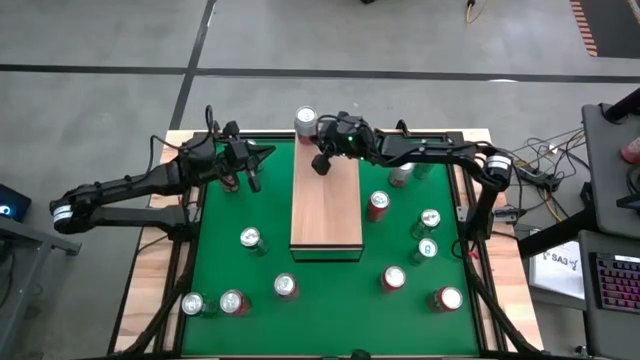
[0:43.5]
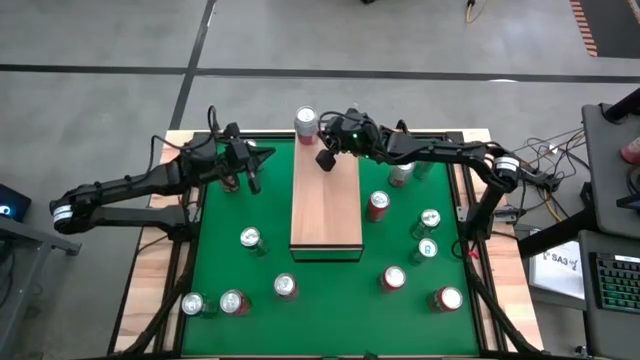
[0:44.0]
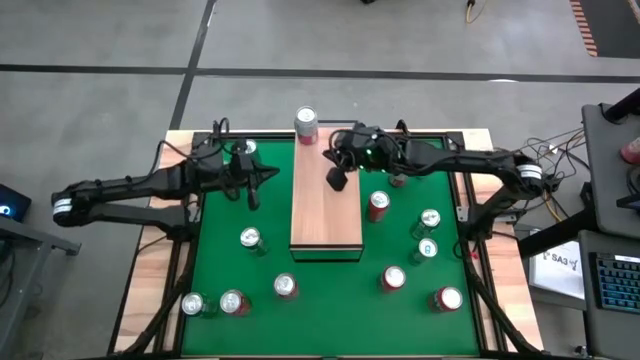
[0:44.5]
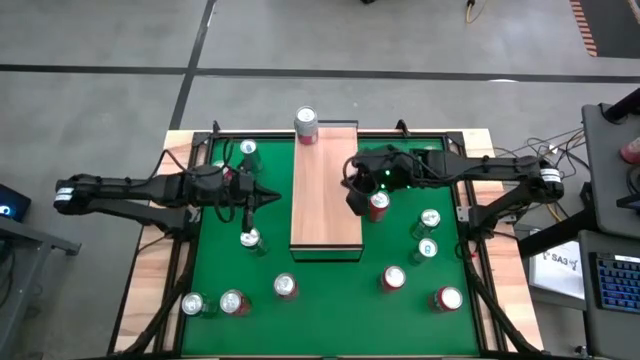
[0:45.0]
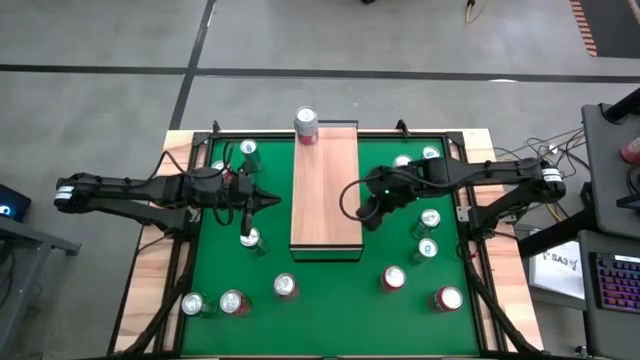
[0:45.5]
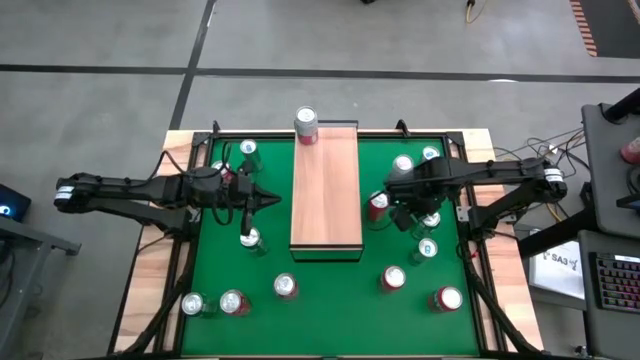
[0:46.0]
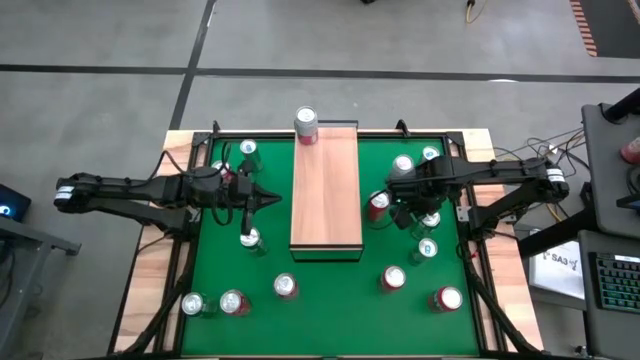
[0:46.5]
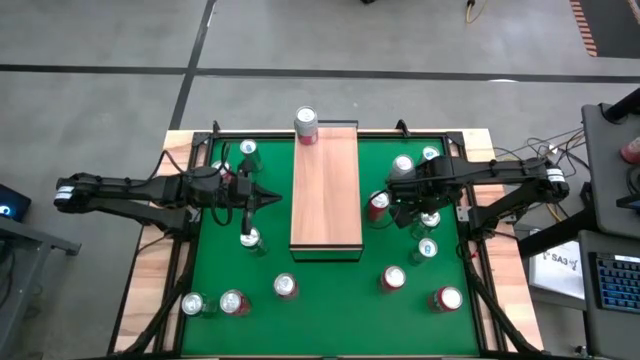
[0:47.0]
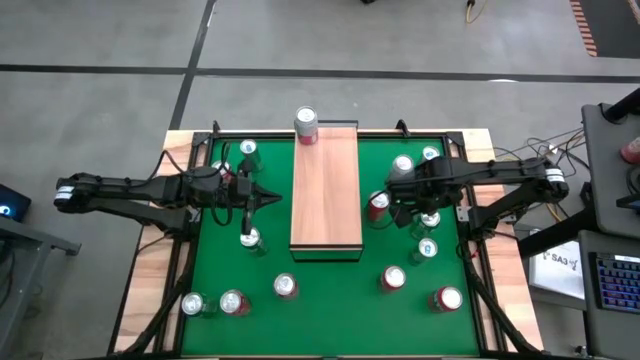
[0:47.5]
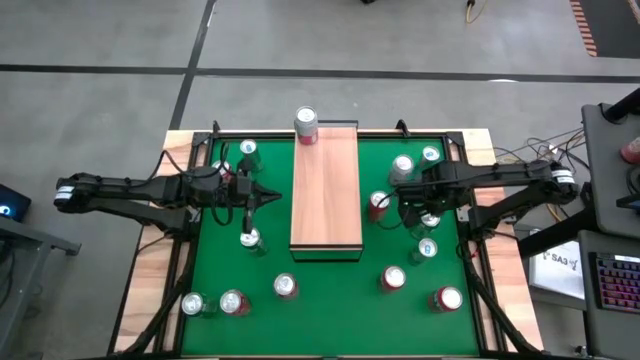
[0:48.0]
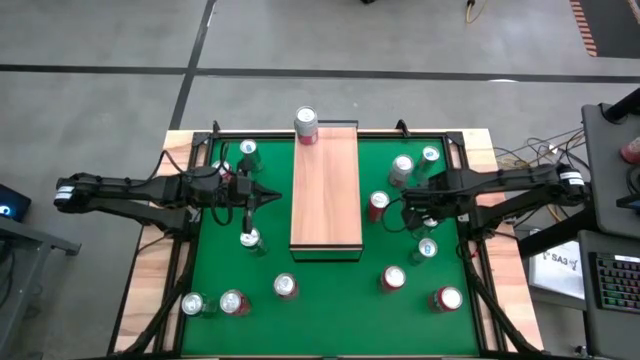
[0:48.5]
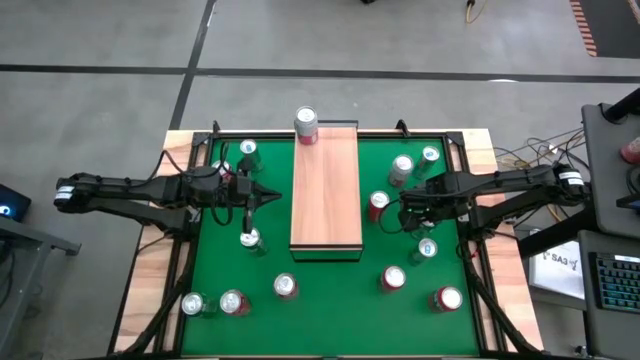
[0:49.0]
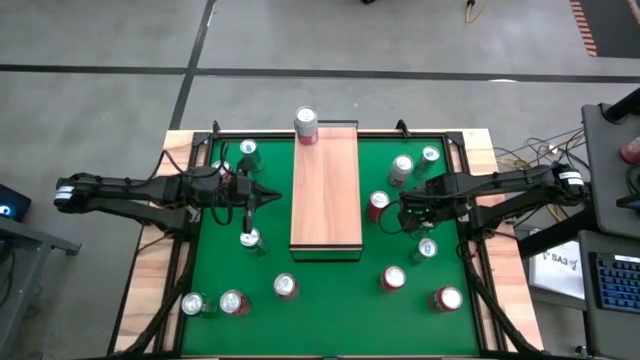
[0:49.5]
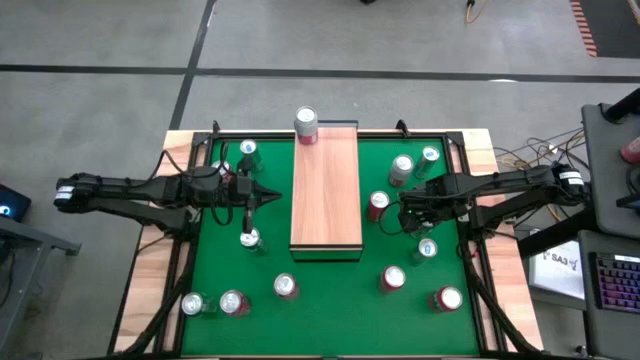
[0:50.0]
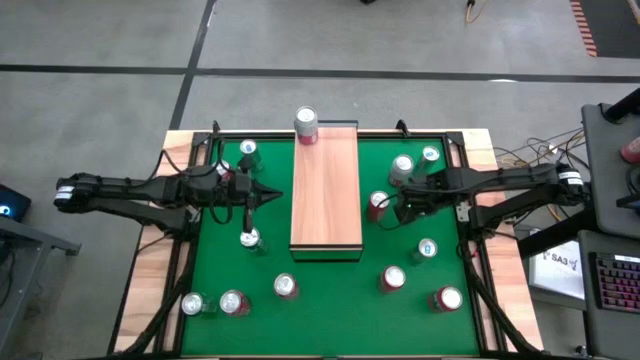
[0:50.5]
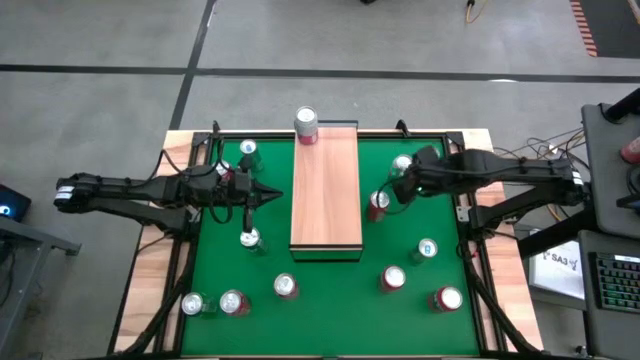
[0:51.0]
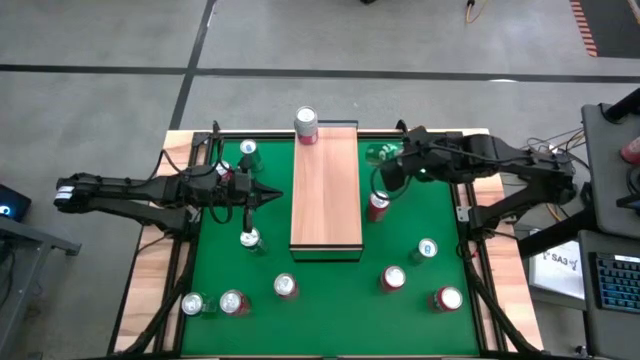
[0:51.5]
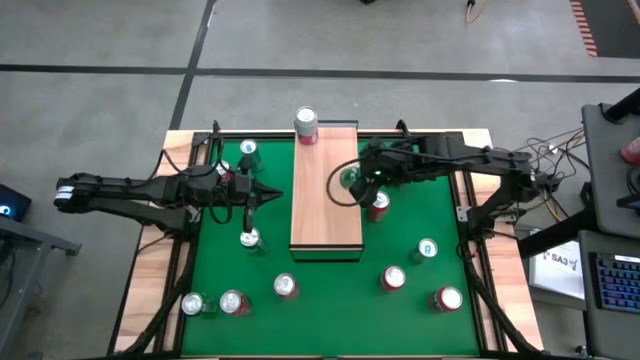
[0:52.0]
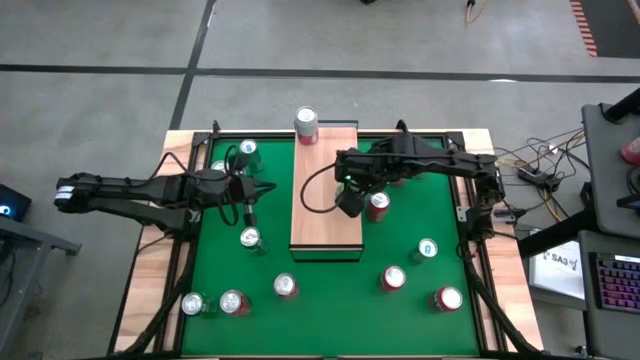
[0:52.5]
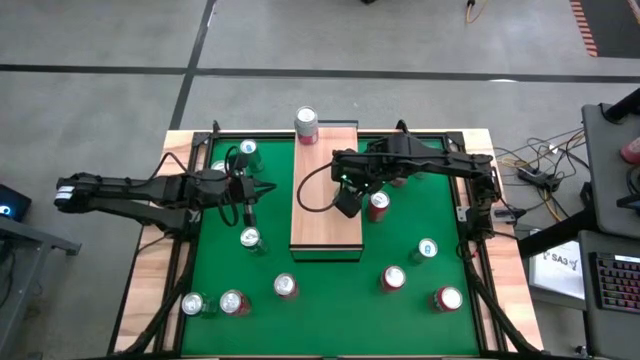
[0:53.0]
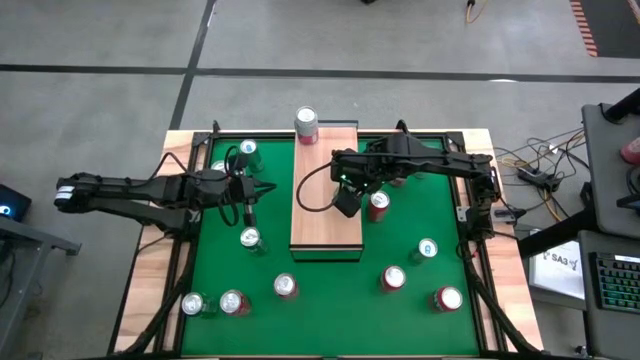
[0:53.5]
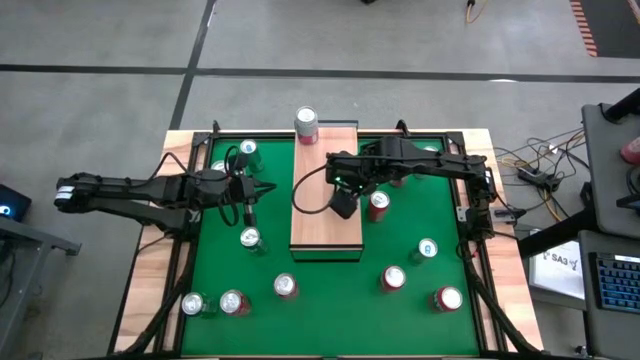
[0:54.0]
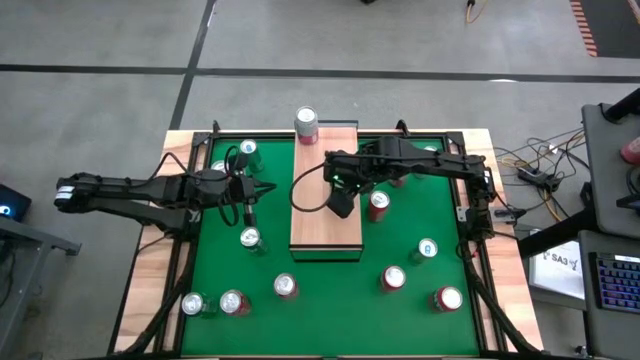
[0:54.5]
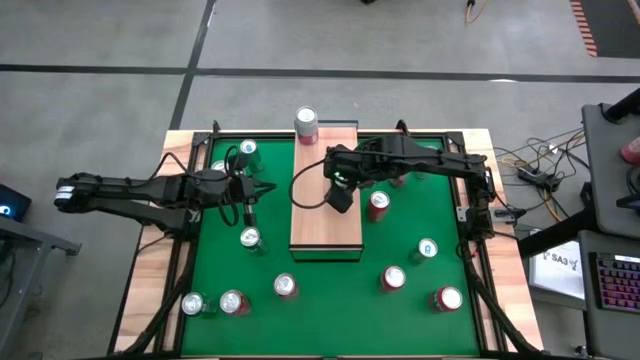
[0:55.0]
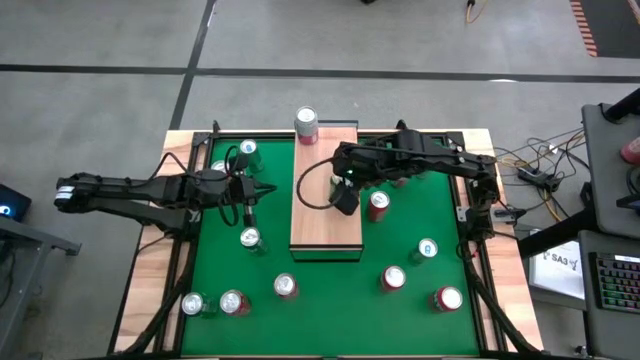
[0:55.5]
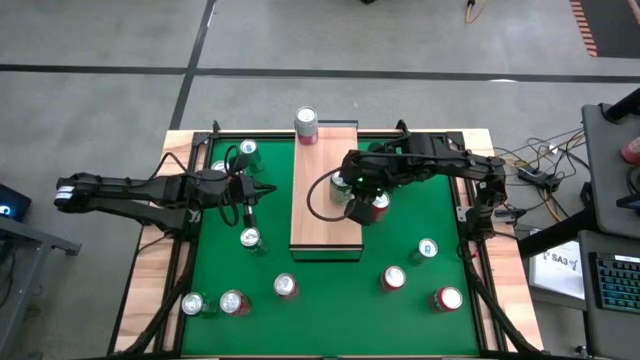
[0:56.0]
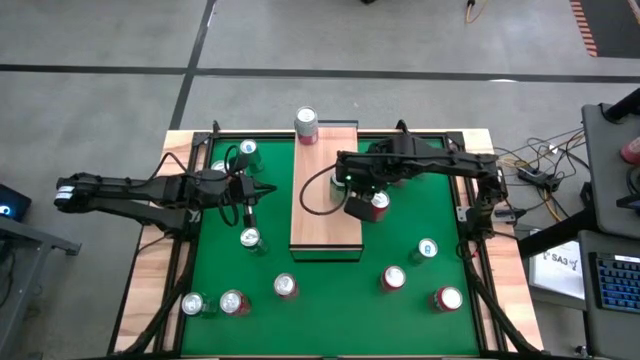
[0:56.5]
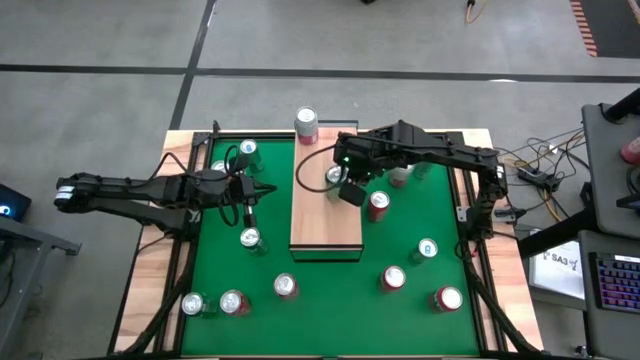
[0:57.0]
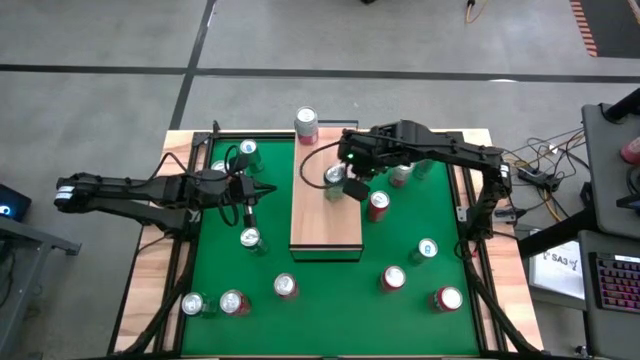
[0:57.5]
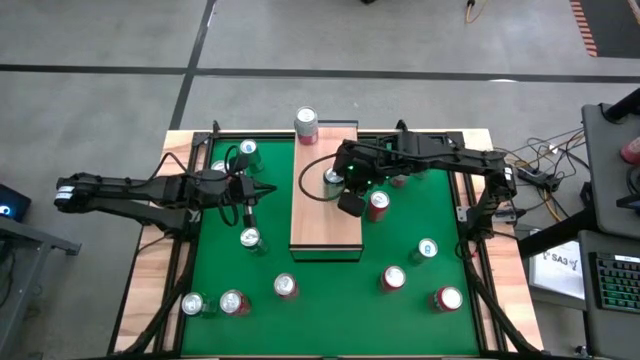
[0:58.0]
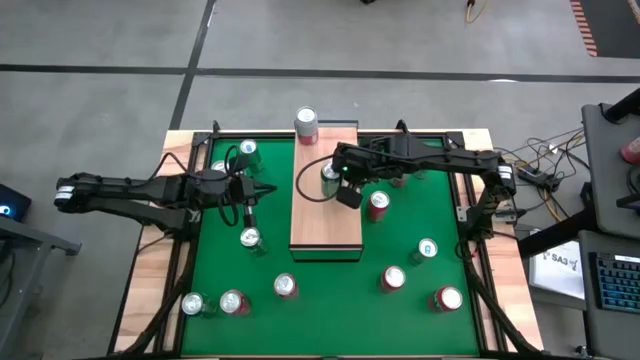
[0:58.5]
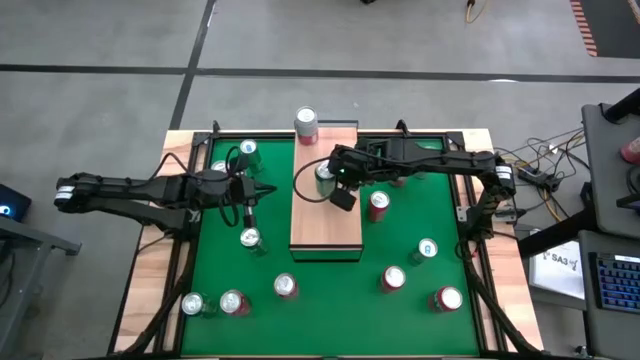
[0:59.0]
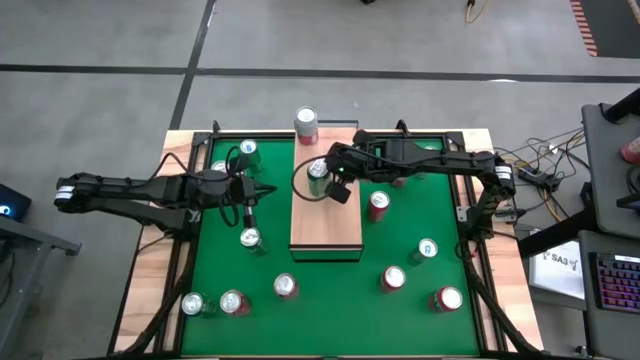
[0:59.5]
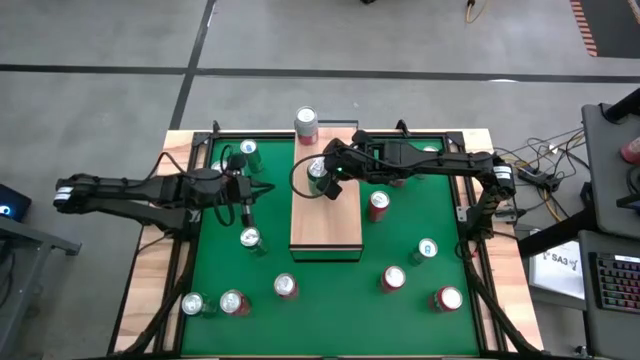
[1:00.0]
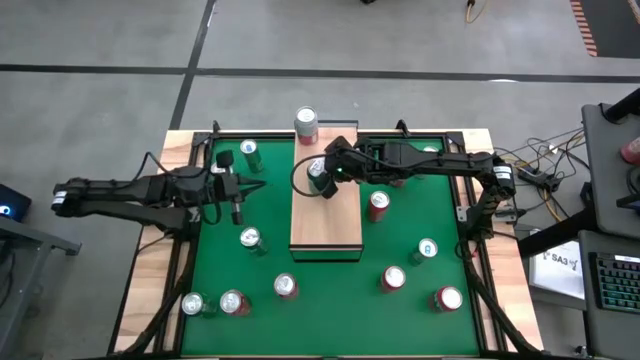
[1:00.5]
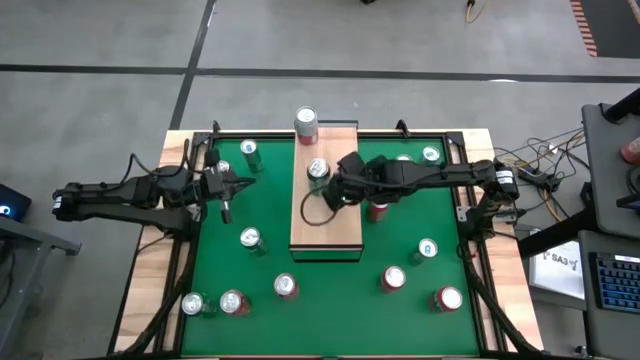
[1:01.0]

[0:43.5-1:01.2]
Task: Place canned beverage on shelf
Put the green can on the shelf

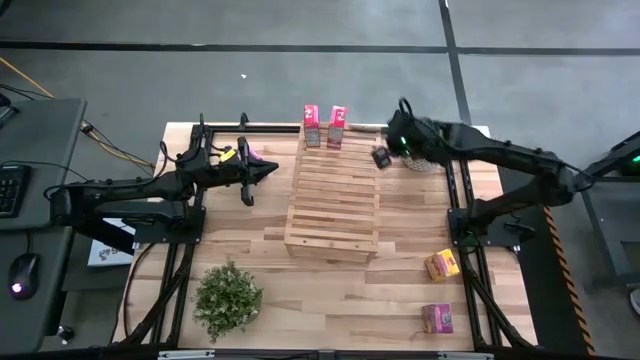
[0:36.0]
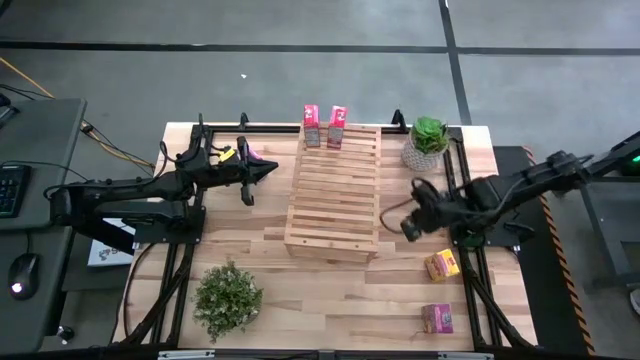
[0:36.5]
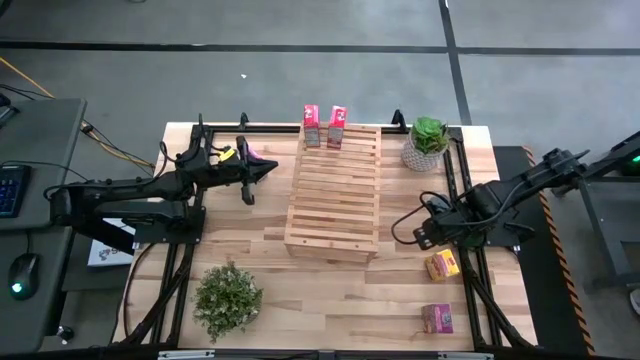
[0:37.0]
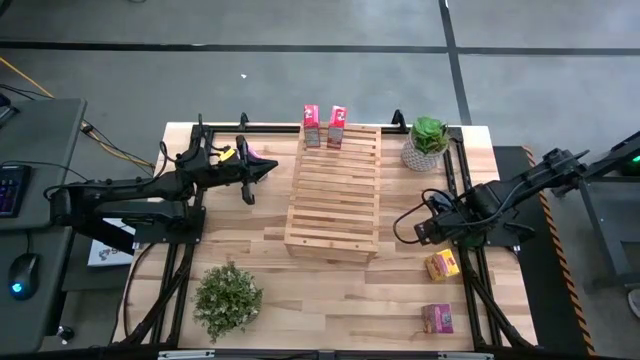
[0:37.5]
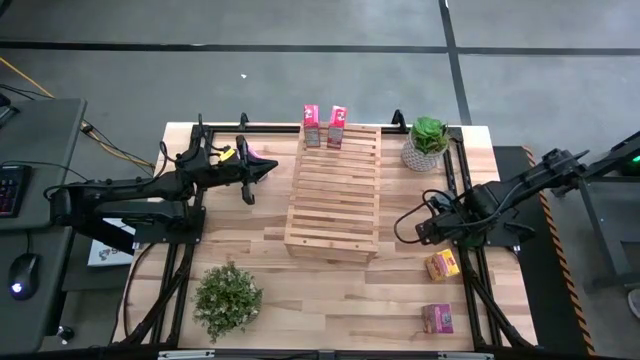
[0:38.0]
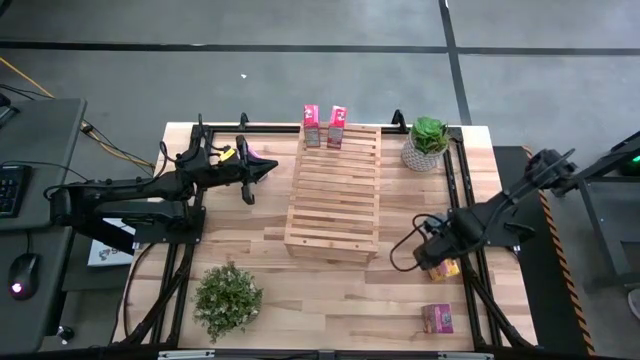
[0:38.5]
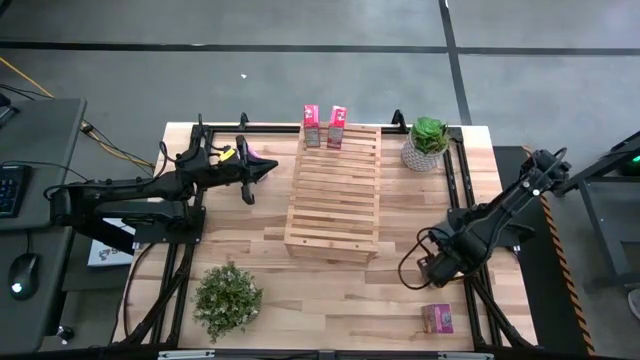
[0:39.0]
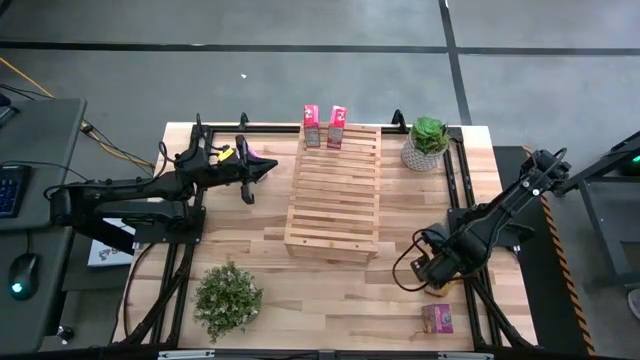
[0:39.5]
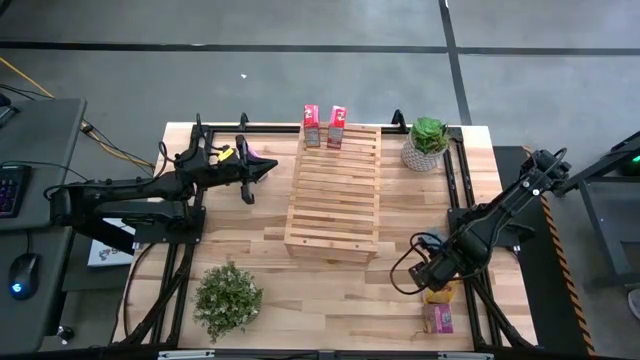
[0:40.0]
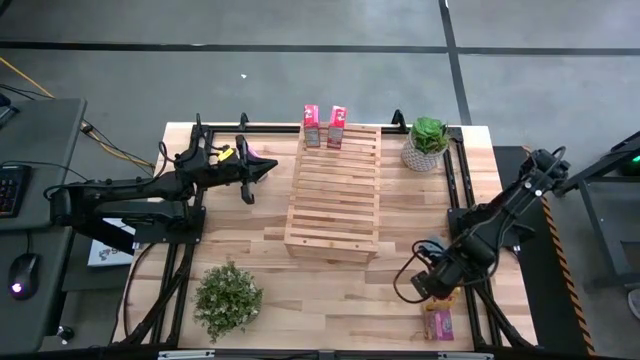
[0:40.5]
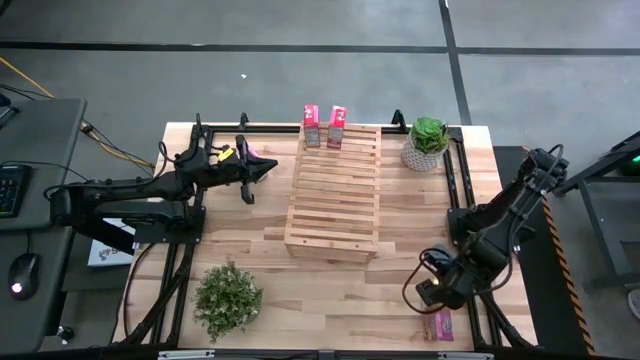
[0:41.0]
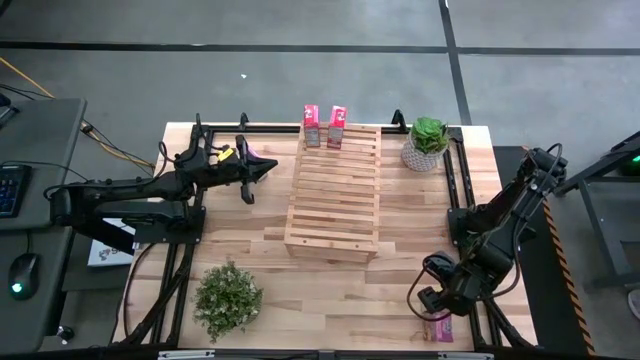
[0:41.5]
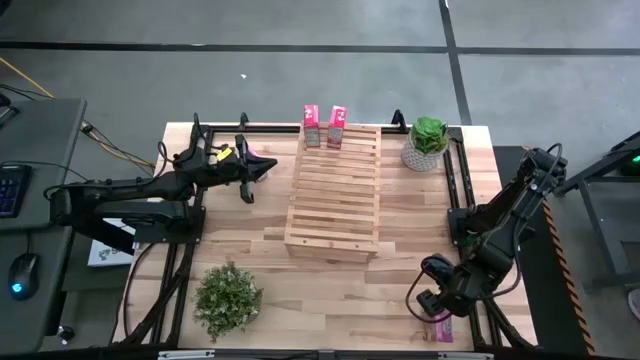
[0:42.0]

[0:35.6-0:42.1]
Task: Stack cereal on shelf
Put the bottom yellow cereal box on the shelf
